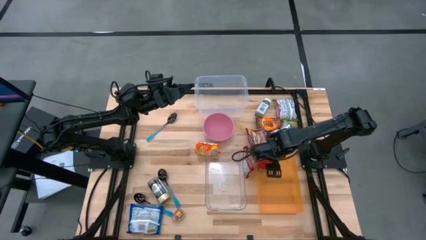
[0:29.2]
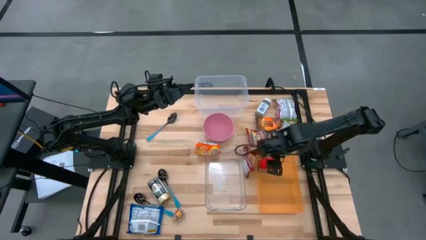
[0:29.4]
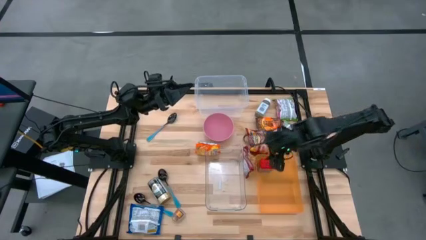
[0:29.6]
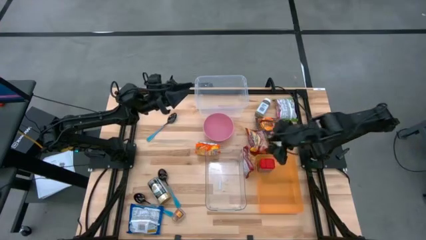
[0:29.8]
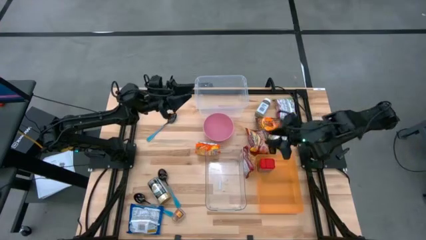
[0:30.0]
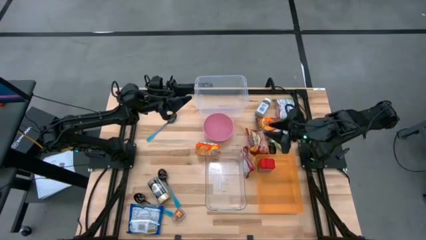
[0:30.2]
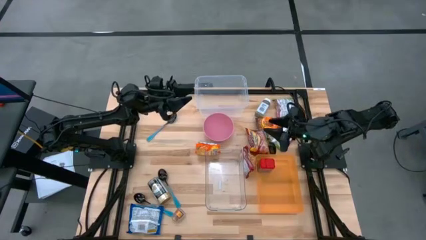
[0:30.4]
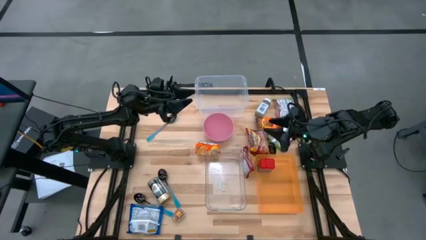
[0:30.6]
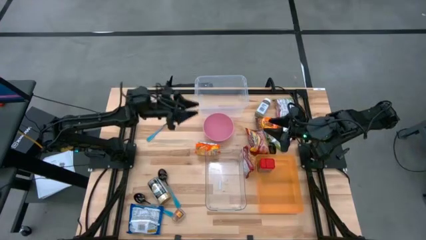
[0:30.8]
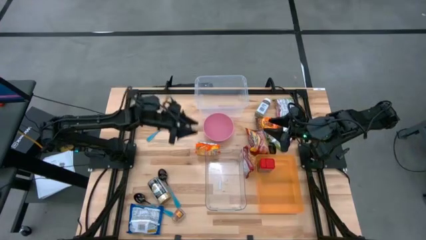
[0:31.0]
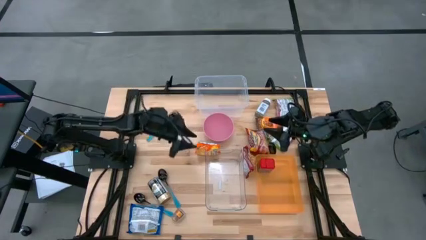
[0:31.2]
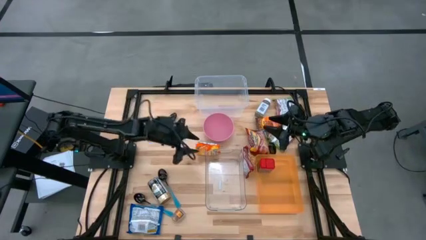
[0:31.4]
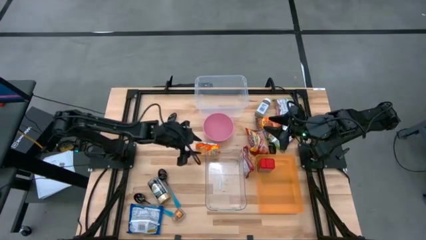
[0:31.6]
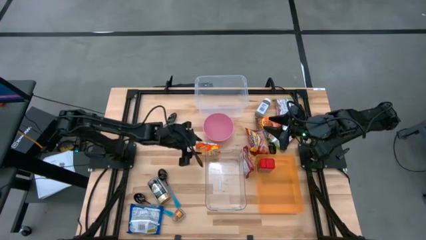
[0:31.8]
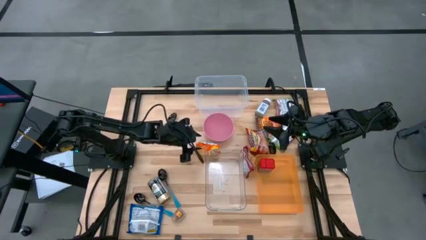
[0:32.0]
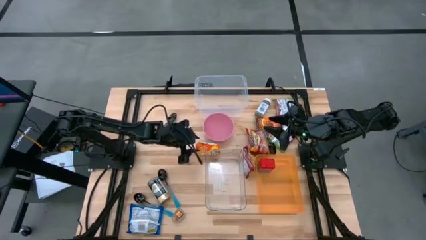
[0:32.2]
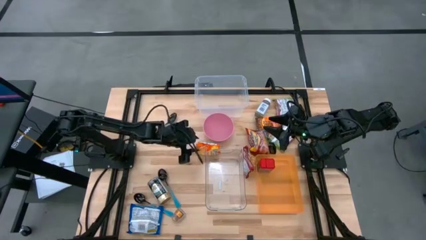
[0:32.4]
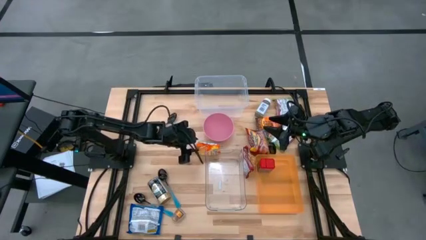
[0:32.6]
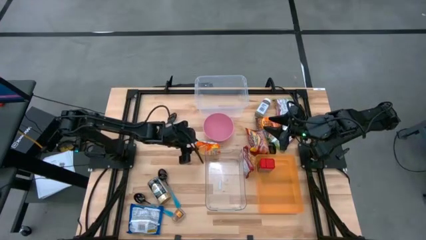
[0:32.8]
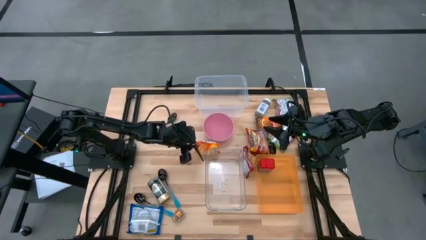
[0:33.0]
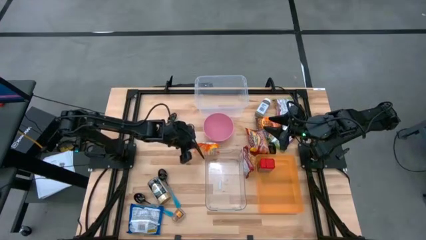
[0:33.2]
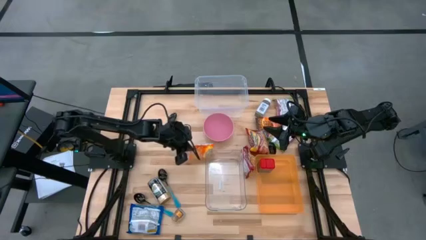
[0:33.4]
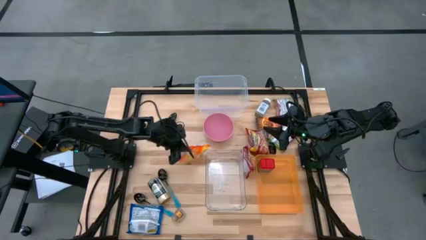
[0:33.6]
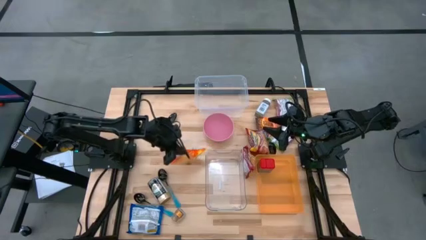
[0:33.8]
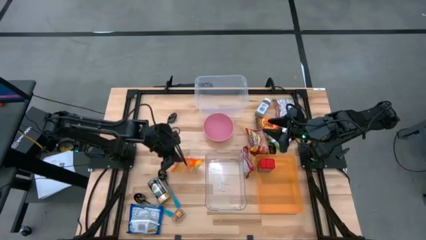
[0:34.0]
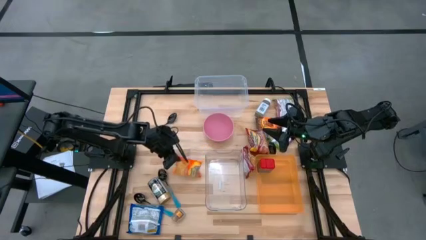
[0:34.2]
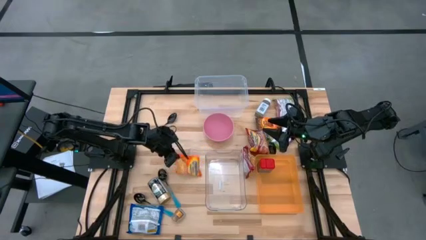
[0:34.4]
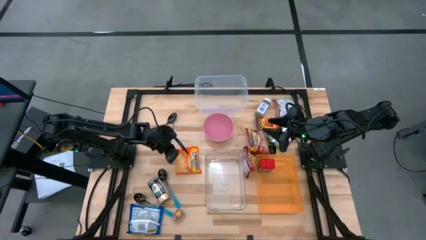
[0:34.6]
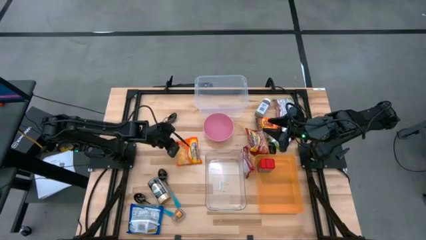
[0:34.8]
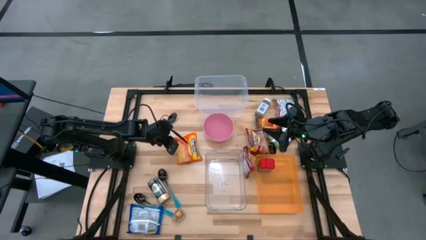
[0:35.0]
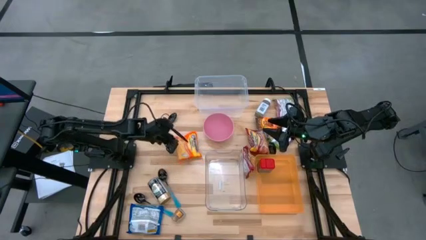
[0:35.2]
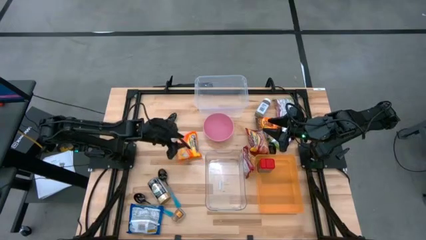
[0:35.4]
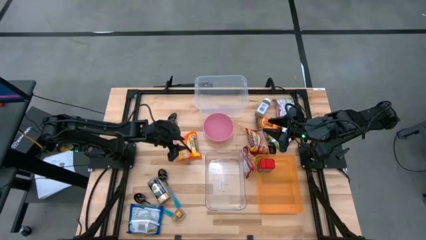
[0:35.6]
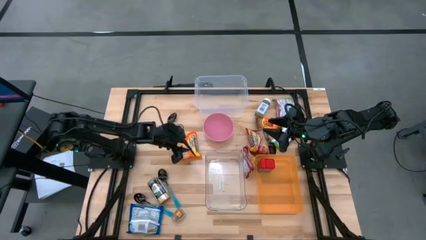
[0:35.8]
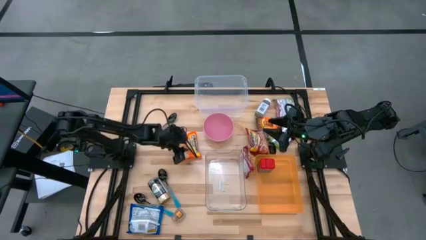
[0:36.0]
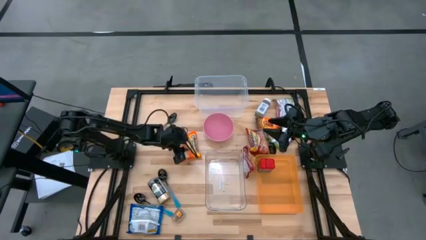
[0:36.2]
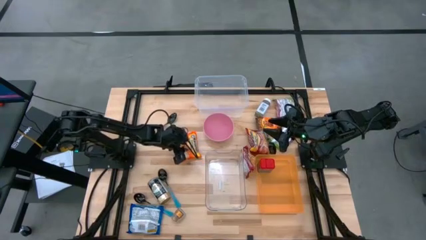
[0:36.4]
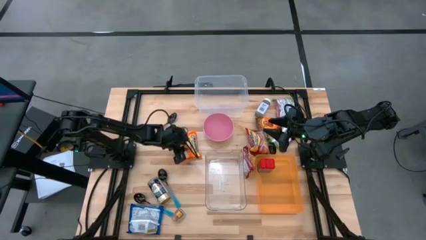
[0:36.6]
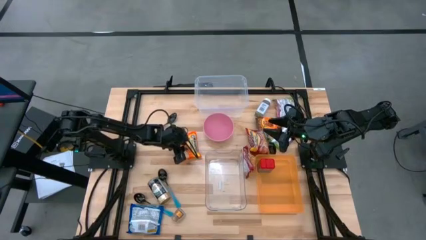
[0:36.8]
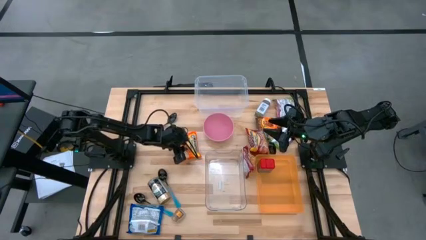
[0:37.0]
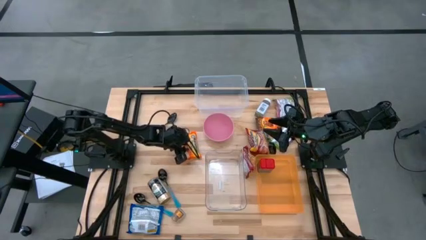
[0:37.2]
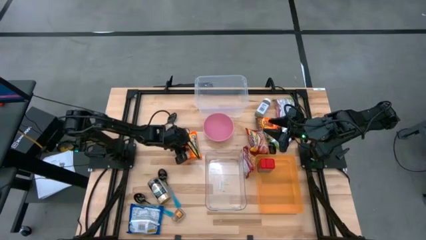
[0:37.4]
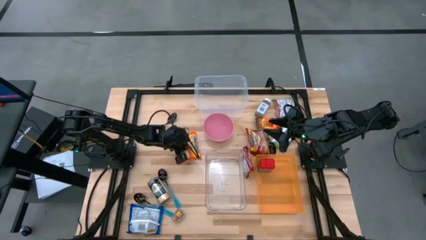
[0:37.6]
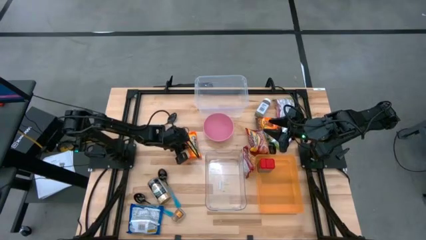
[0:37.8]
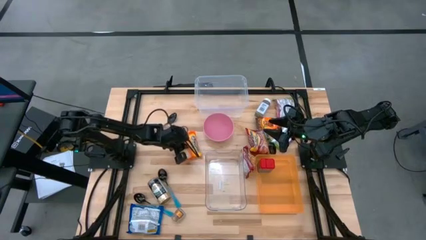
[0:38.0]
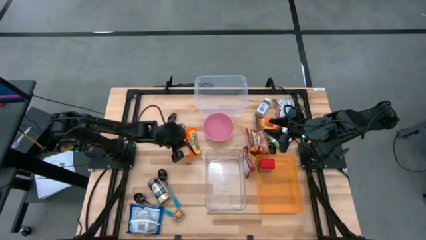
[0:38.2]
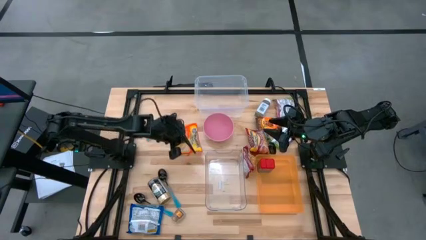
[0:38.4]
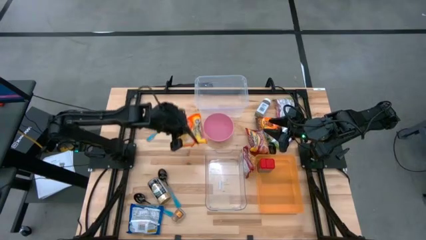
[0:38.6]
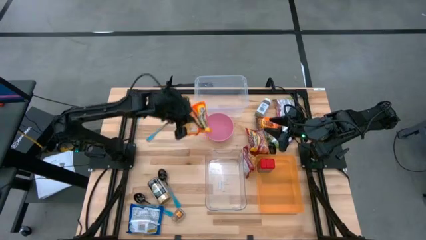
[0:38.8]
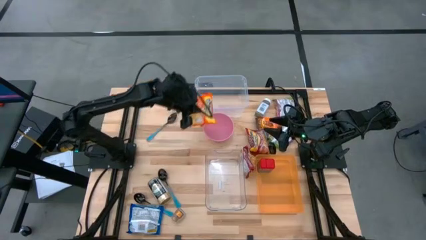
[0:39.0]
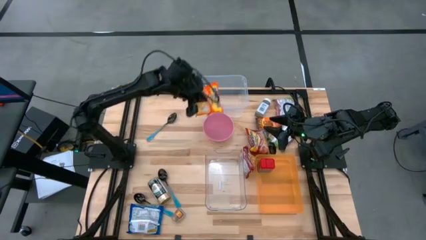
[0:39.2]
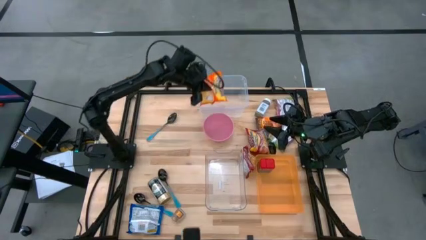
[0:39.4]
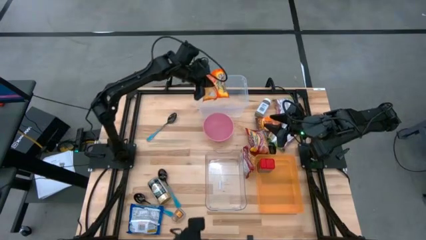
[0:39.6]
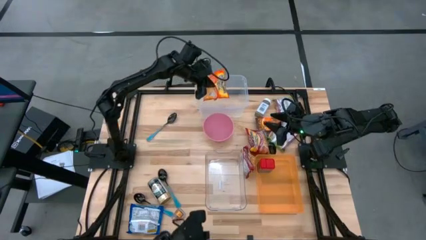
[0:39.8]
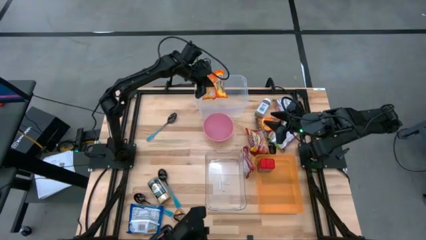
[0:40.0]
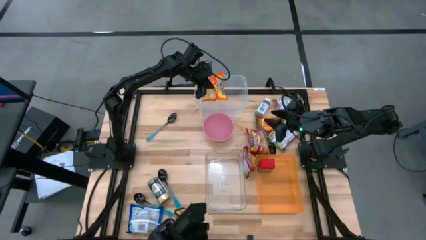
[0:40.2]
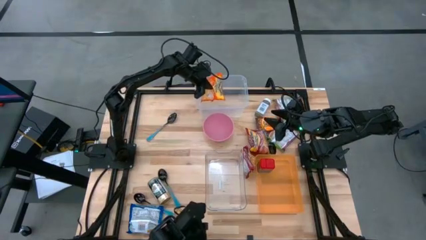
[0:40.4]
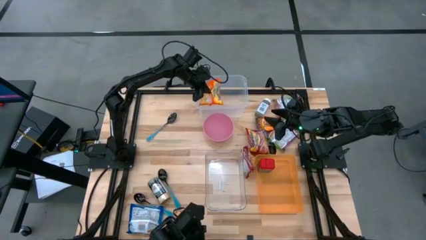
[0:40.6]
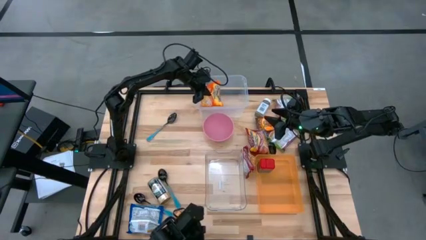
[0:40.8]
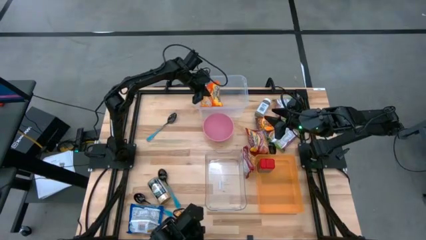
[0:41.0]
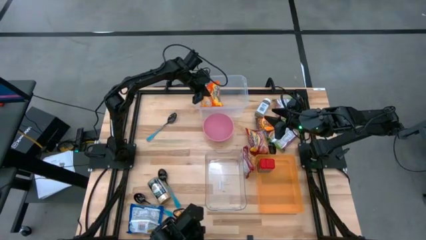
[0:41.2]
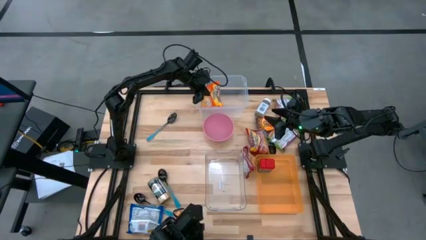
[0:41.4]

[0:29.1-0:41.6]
Task: Pick & Place Food Item
Put the orange noodle pack into the top transparent bin

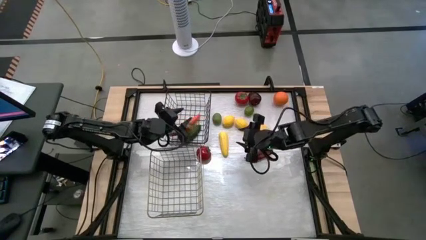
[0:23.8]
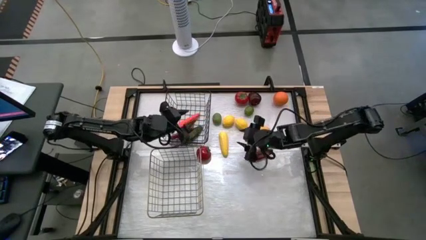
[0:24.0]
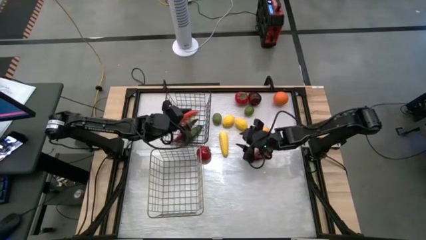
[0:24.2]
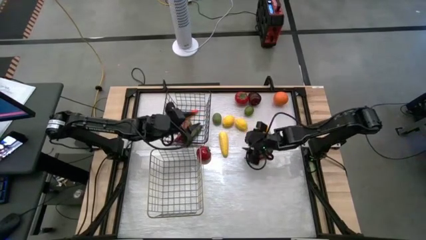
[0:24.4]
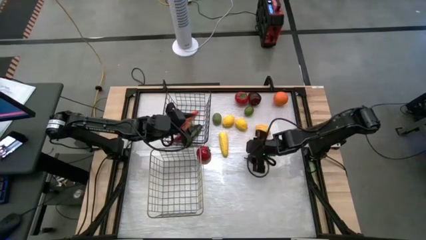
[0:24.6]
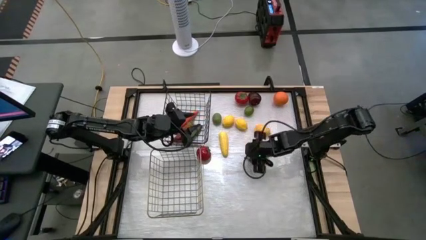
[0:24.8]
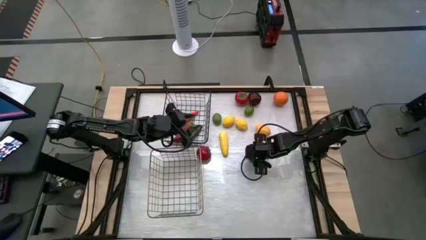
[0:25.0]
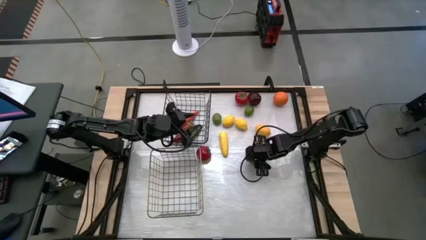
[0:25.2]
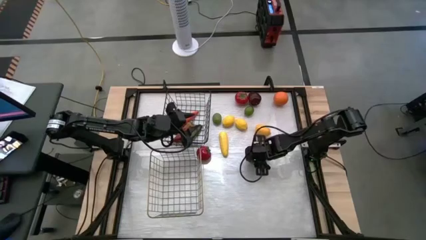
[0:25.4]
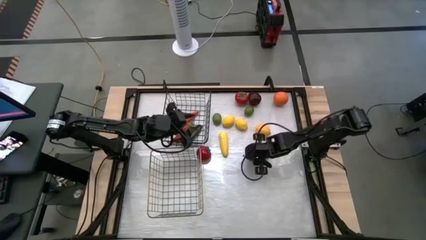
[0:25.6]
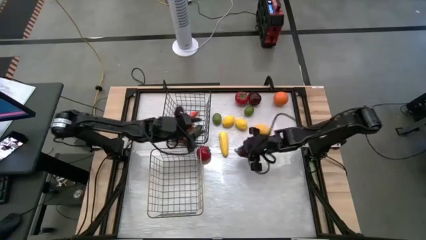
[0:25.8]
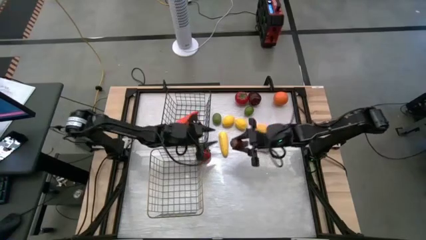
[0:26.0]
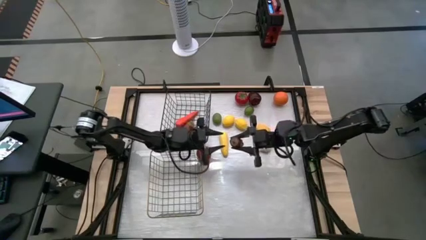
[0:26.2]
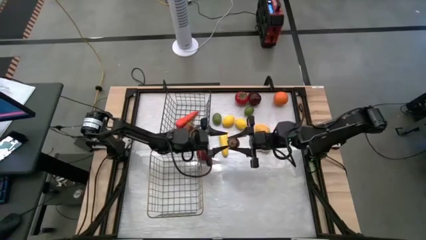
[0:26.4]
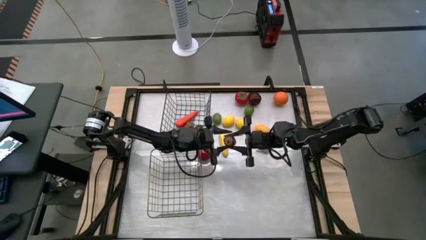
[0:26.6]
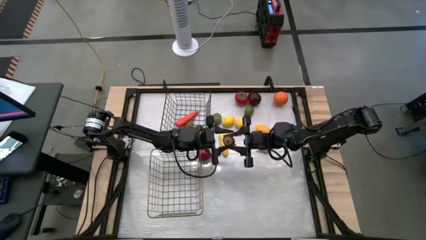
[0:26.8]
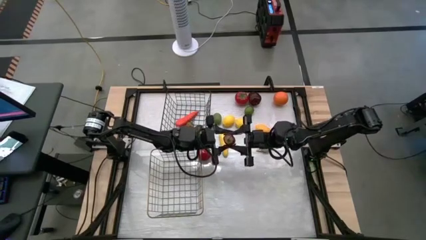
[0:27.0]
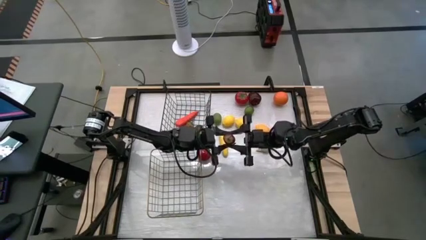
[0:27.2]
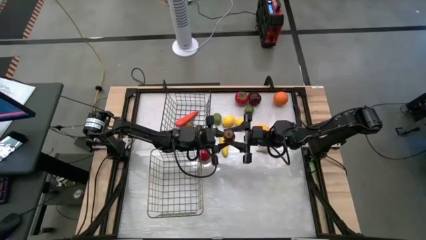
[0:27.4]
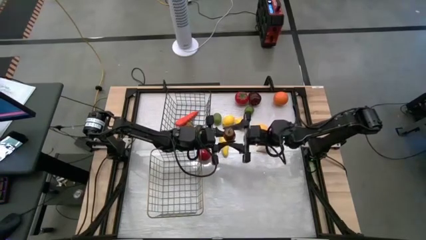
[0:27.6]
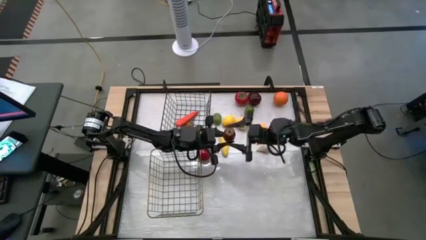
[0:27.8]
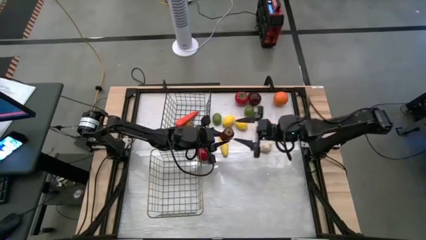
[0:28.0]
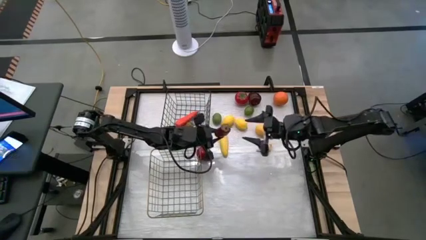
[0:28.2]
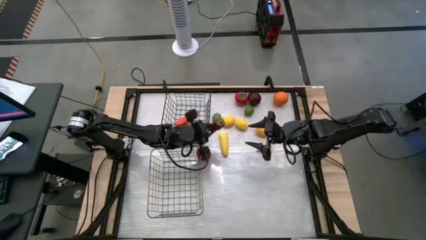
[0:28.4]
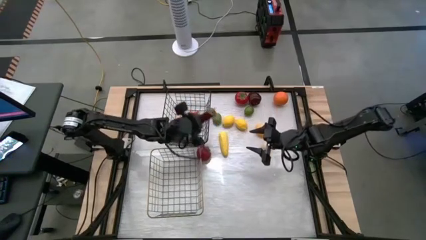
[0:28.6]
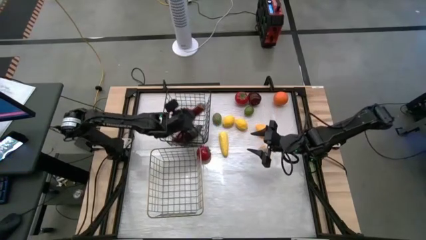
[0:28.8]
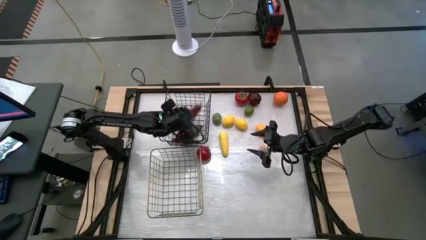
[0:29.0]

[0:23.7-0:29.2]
Task: Sort produce into baskets
Put the red chili pepper into the black wire basket
